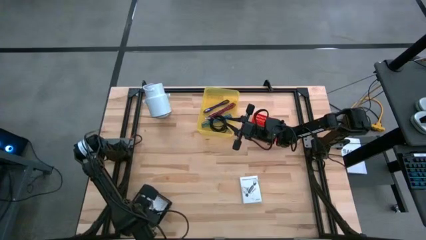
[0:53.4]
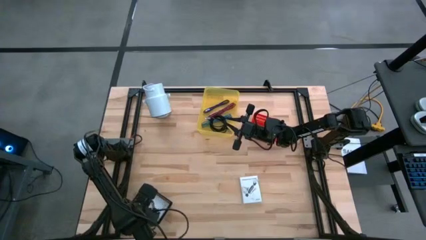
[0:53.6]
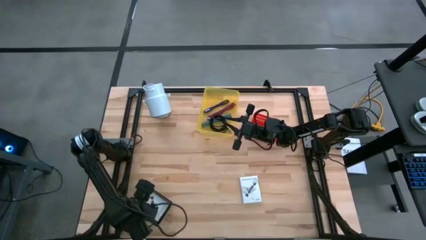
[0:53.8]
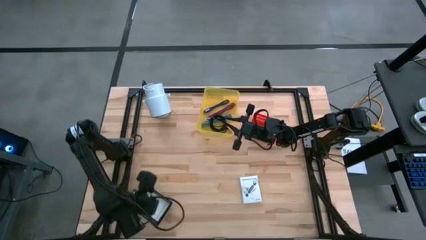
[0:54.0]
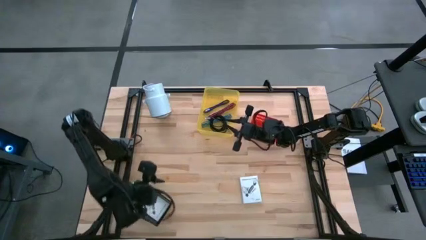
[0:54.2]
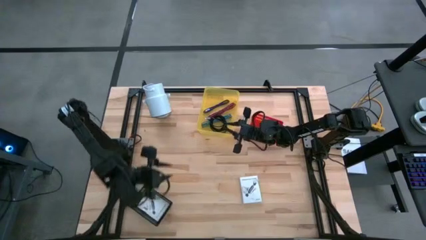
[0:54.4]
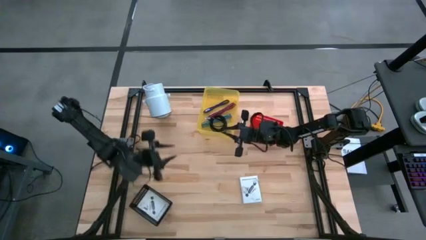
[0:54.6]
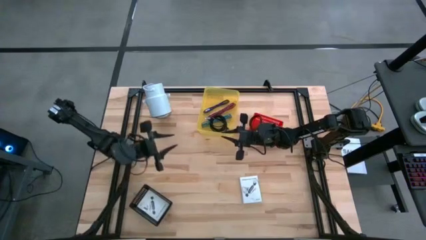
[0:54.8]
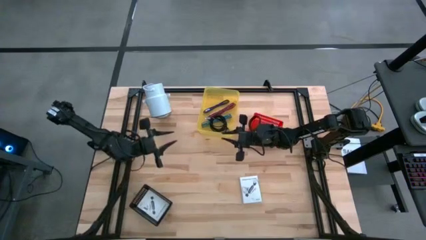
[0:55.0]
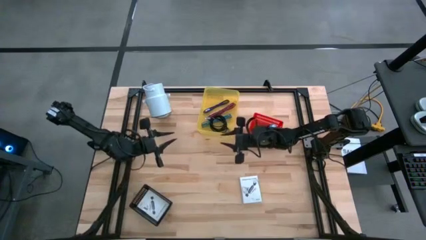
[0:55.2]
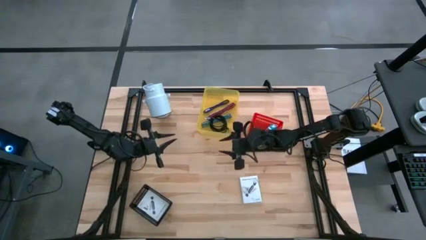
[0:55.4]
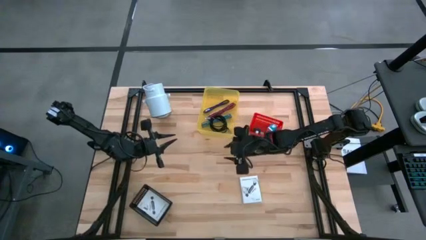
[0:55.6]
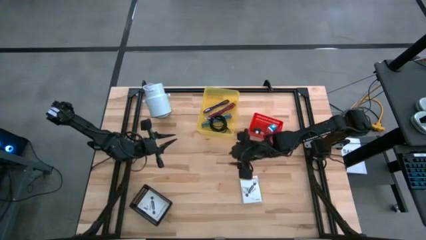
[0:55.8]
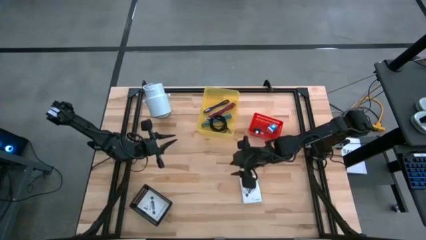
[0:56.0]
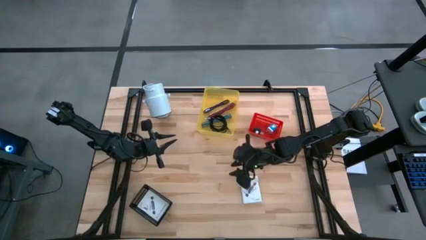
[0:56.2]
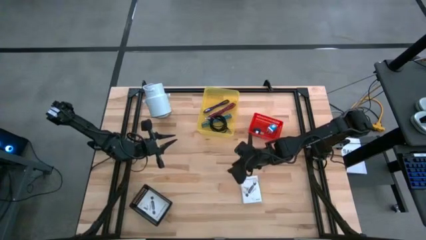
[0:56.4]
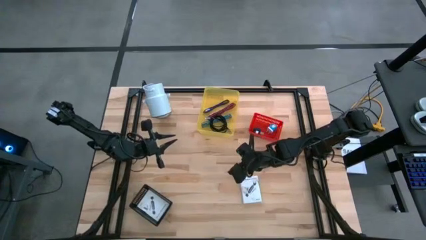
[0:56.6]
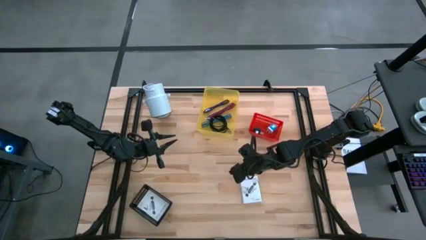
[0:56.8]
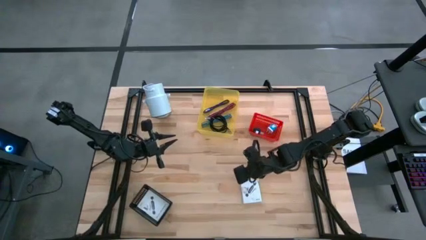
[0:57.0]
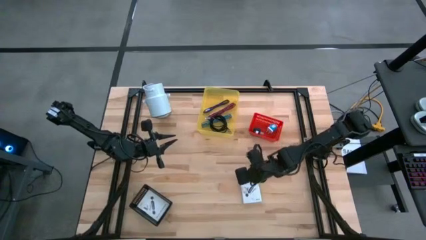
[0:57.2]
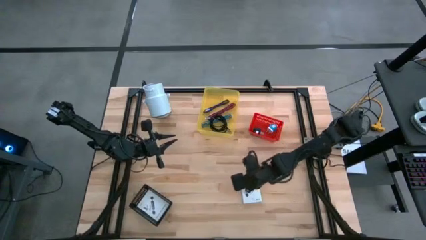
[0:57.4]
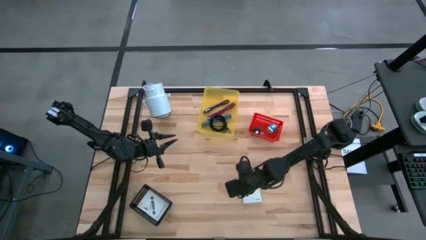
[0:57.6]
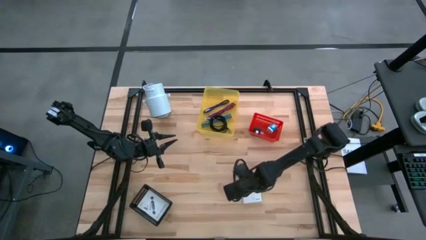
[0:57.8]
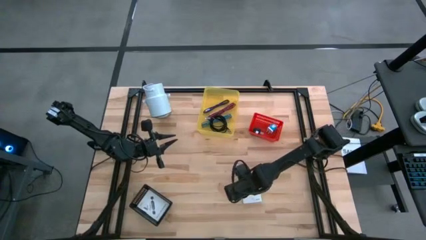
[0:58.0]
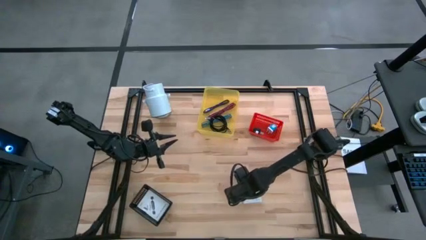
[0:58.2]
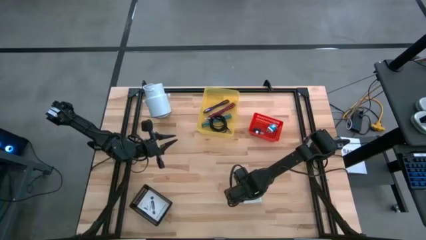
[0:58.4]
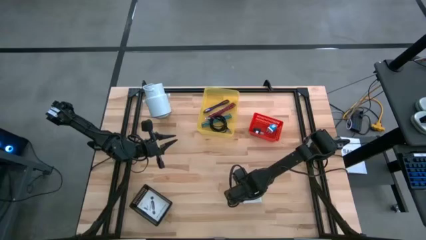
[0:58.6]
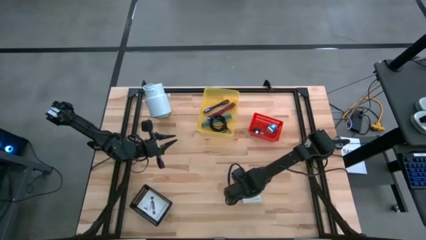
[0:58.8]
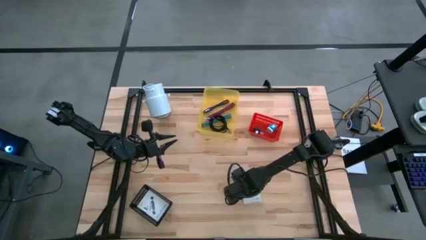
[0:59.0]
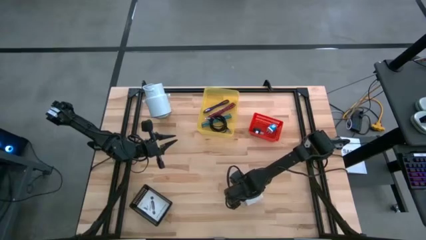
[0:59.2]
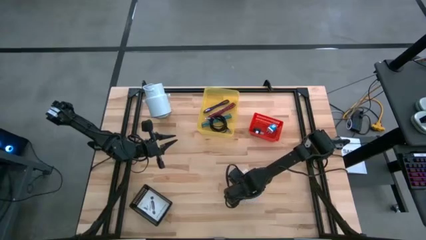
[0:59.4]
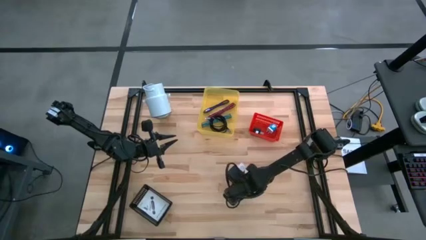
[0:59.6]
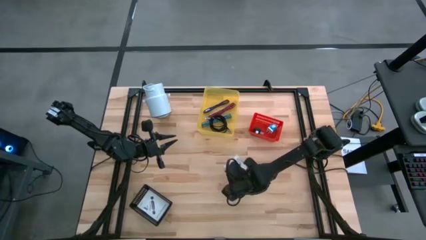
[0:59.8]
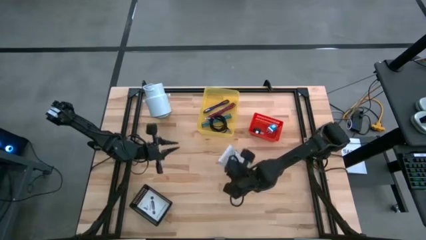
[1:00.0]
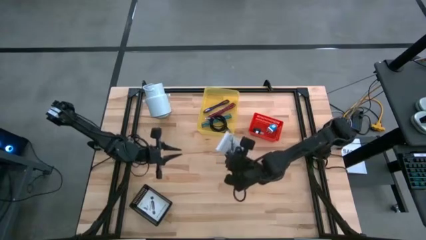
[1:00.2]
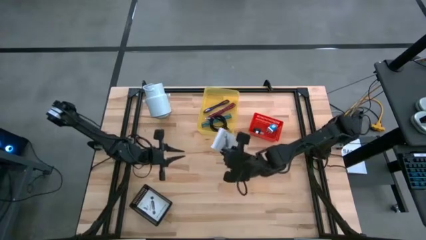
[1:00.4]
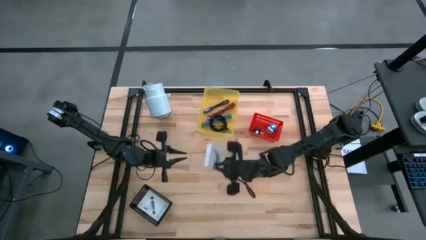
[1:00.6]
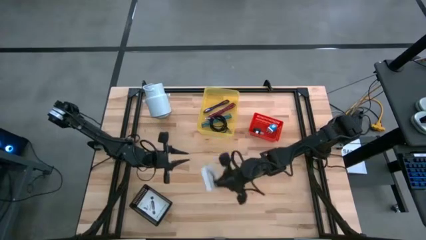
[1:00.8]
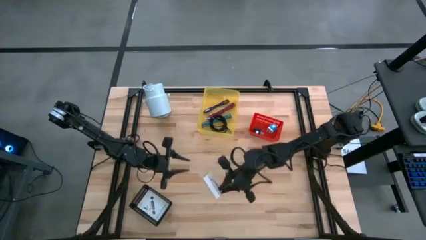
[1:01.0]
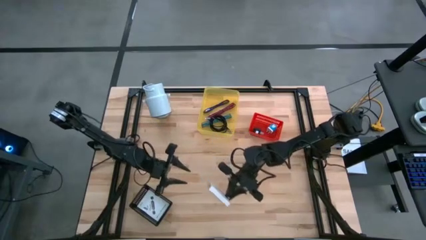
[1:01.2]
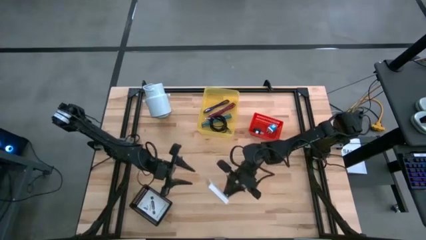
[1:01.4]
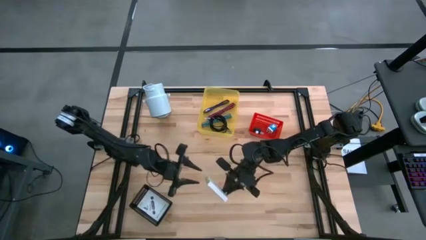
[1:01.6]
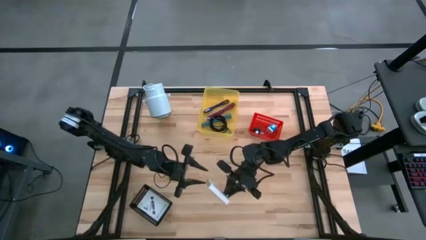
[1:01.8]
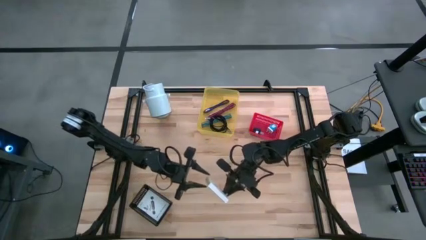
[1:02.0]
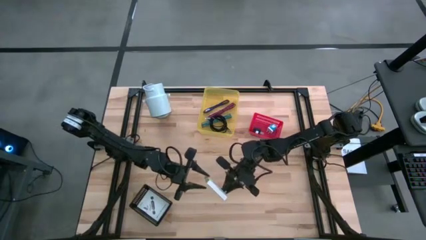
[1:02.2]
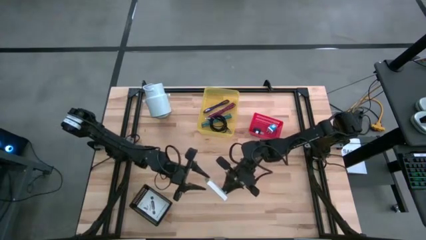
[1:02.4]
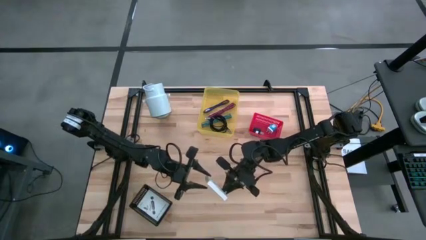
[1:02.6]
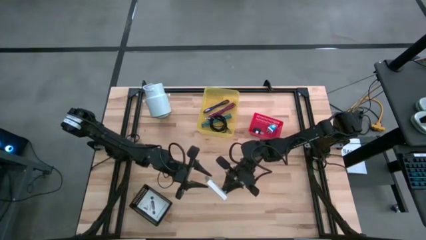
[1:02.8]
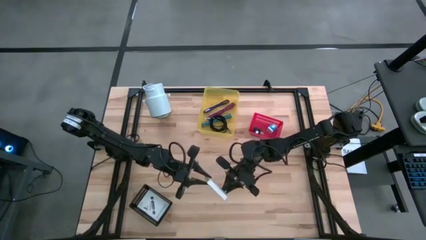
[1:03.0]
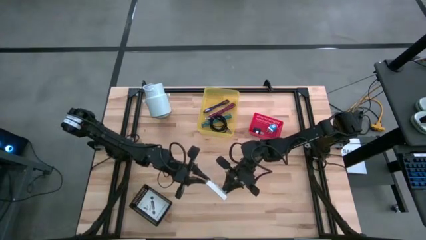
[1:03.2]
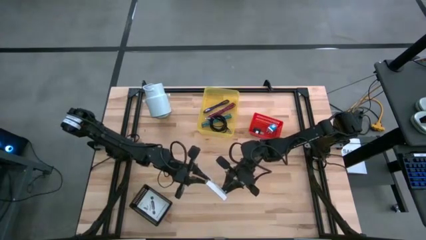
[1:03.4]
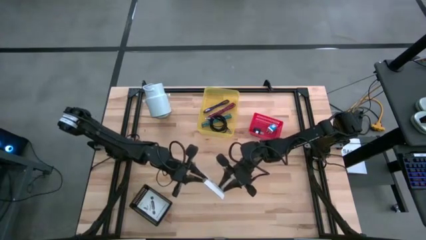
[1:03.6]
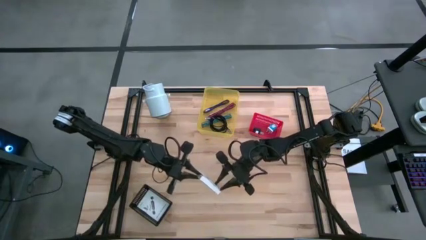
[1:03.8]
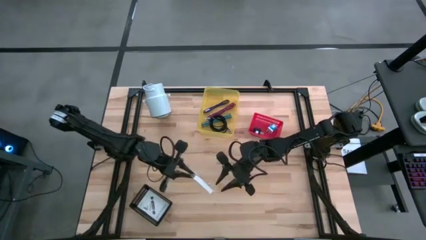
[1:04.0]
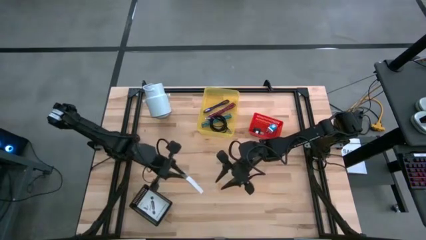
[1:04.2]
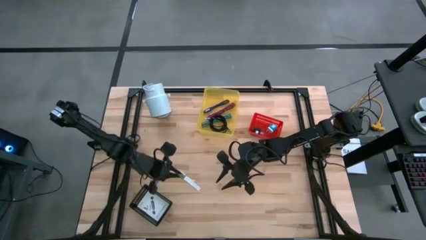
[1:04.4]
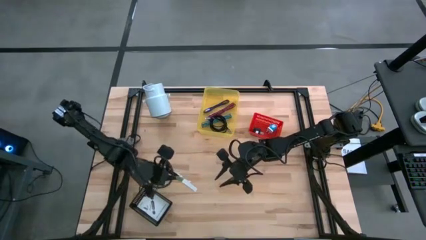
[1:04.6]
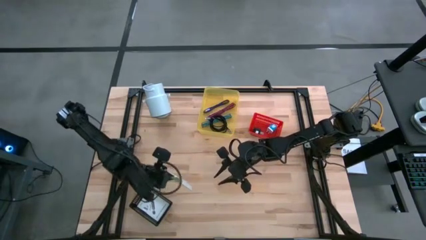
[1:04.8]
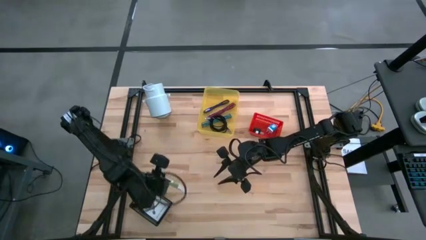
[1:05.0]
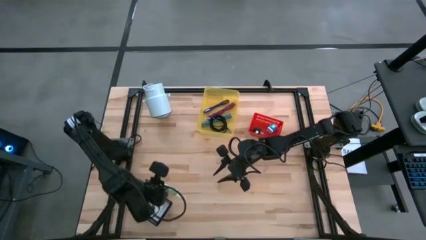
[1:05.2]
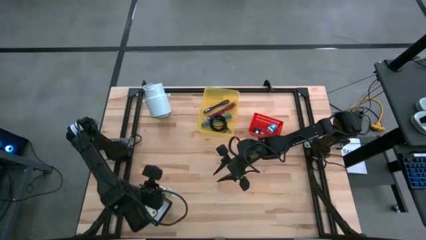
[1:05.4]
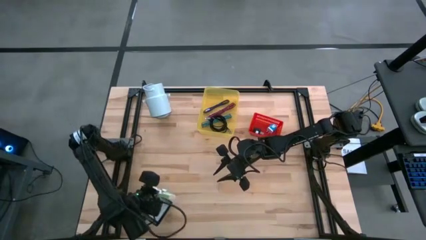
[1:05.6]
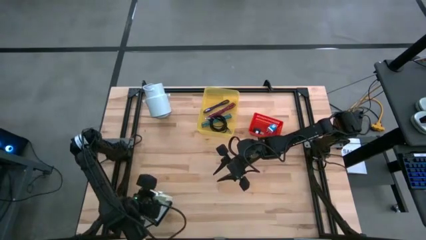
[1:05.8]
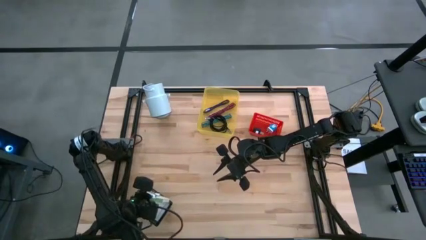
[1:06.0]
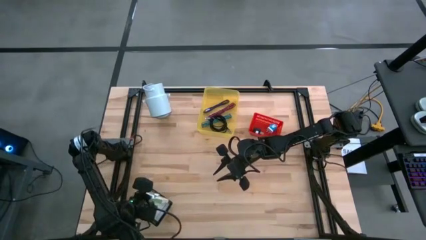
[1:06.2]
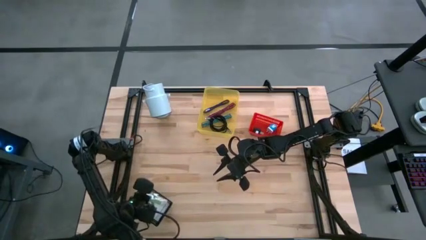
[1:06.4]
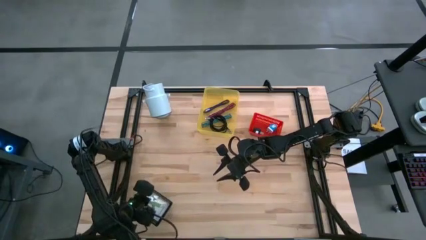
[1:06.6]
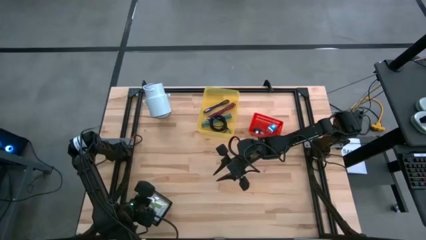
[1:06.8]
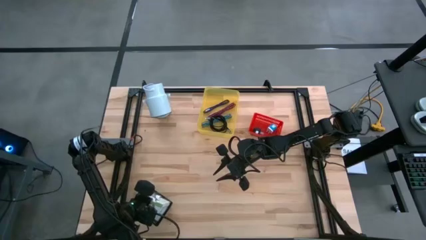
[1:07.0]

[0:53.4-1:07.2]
Task: Pick and place items into bin
Put the white card reader box into the black bin

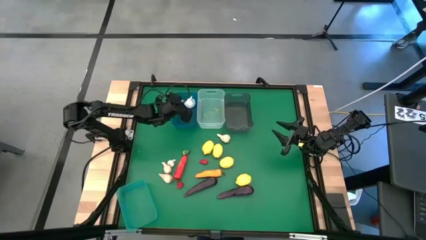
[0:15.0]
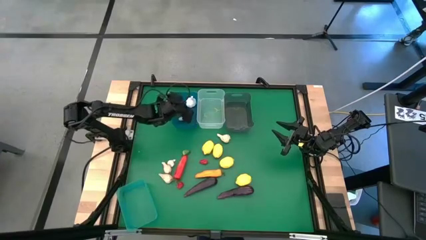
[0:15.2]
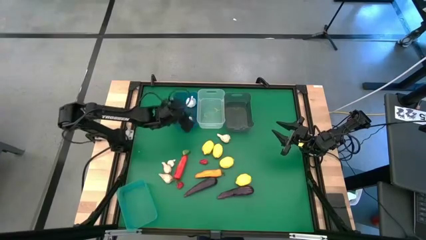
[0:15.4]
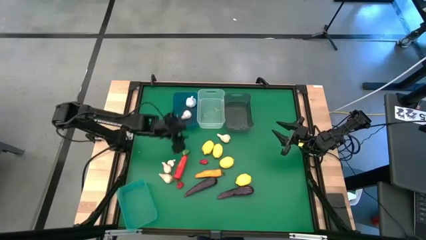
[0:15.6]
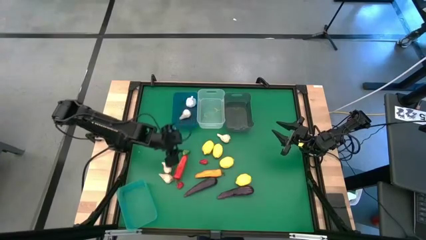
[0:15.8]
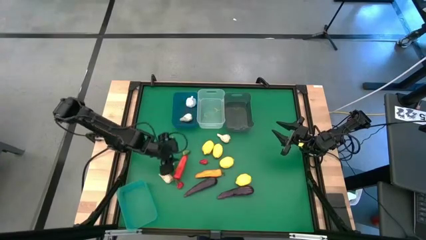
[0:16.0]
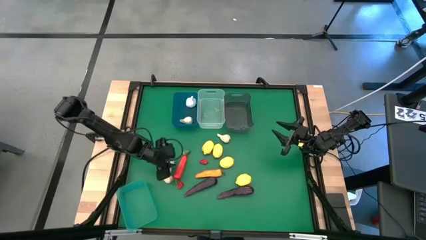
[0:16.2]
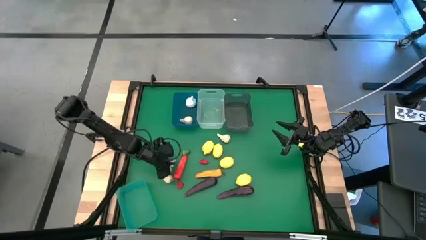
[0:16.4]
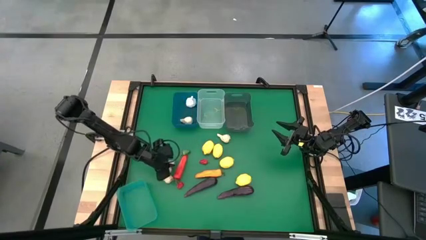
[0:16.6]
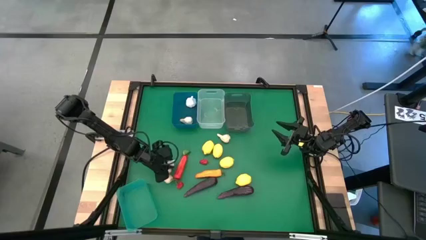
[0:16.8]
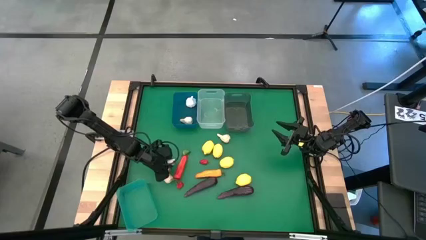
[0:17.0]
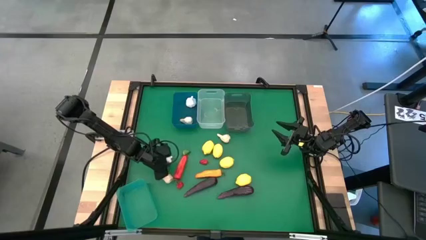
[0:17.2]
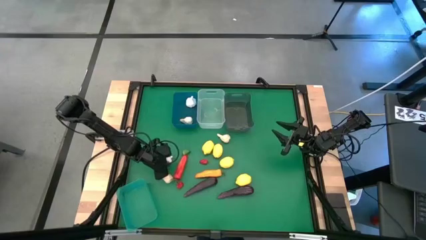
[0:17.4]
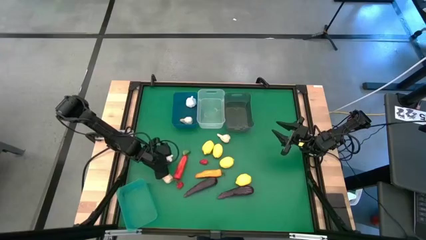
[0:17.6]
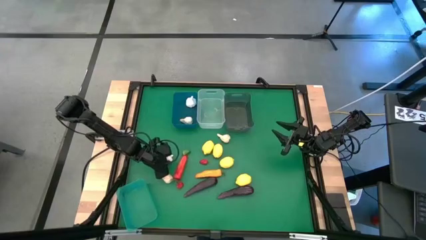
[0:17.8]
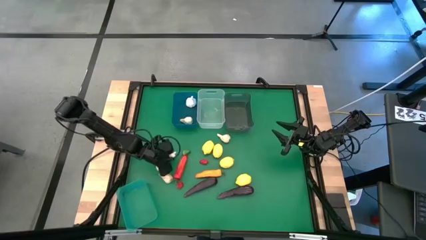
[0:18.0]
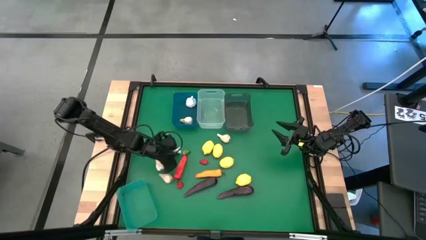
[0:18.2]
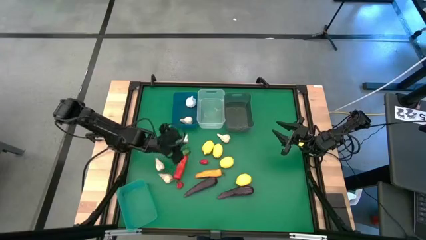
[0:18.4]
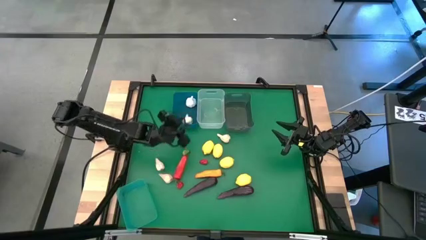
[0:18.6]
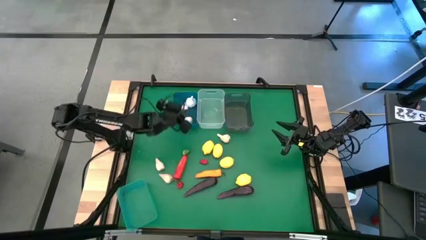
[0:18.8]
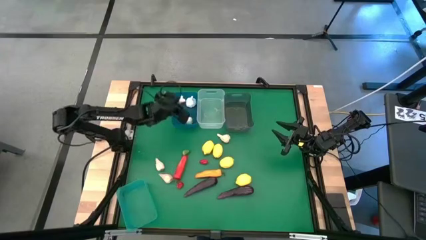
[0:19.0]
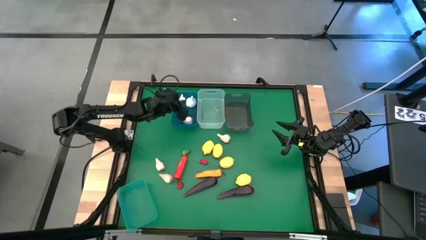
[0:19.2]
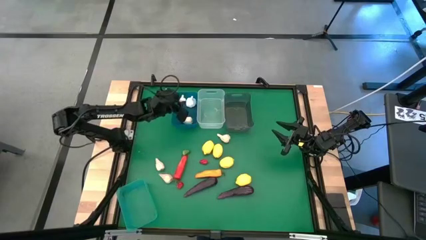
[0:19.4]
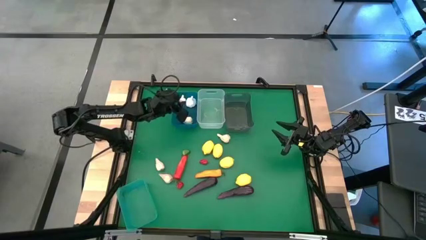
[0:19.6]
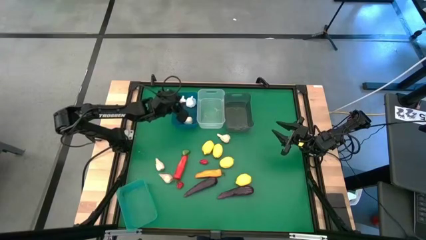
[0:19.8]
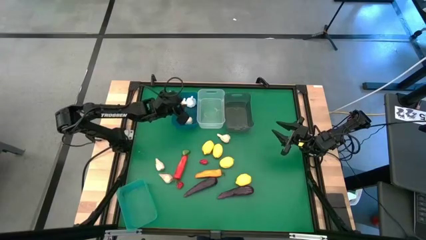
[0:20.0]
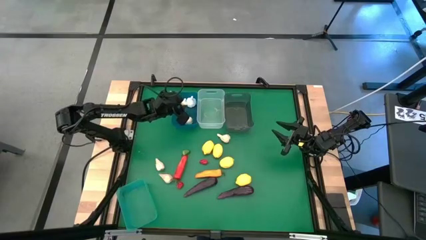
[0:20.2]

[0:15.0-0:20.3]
Task: Sort produce into baskets
Put the white garlic into the blue bin
